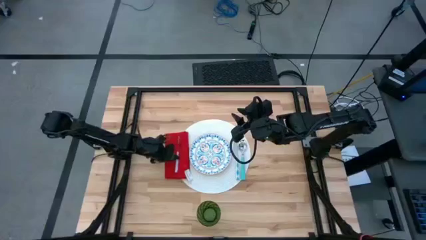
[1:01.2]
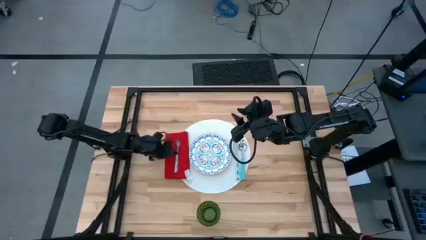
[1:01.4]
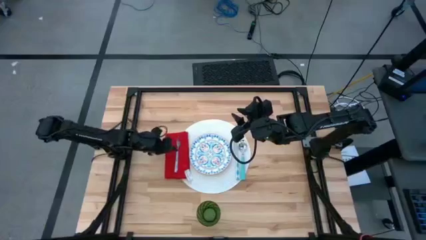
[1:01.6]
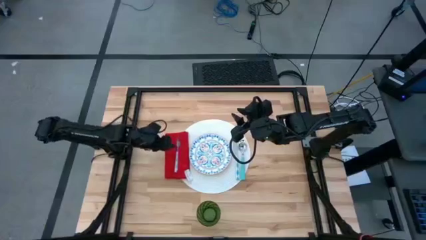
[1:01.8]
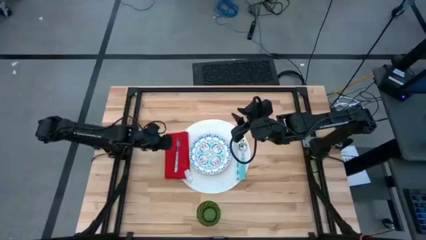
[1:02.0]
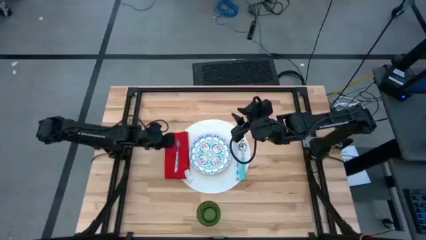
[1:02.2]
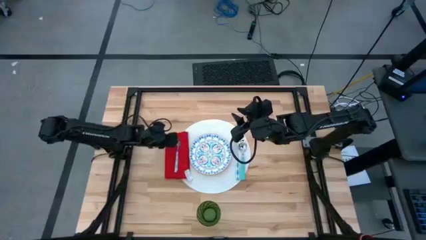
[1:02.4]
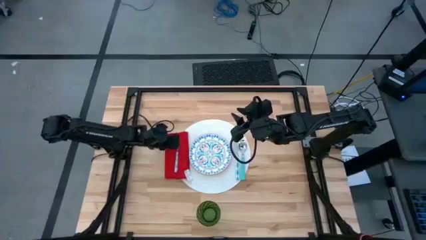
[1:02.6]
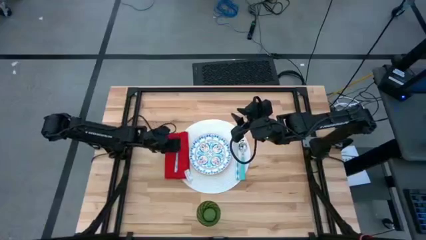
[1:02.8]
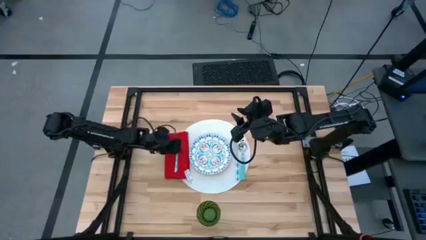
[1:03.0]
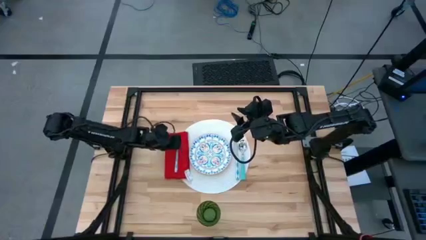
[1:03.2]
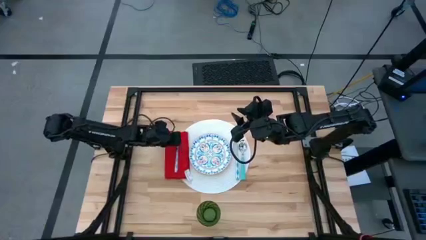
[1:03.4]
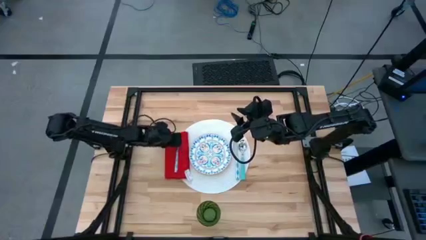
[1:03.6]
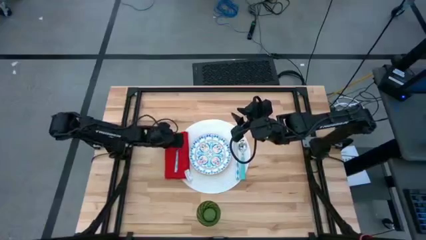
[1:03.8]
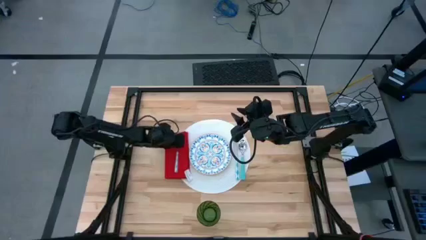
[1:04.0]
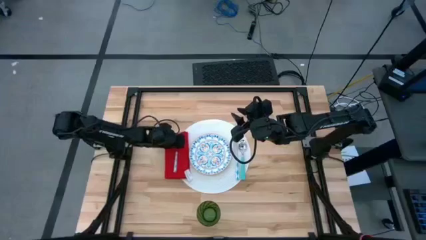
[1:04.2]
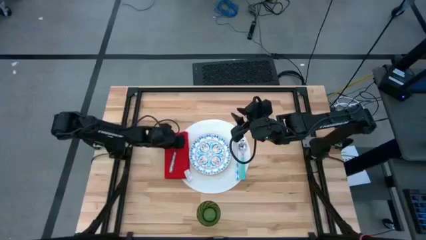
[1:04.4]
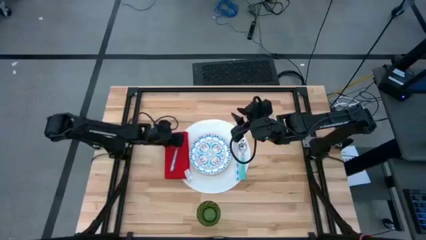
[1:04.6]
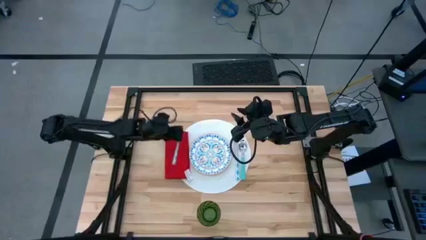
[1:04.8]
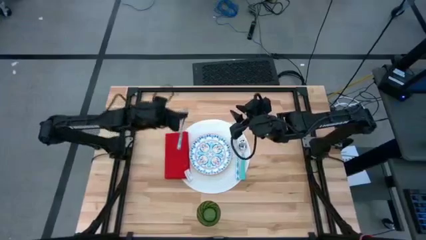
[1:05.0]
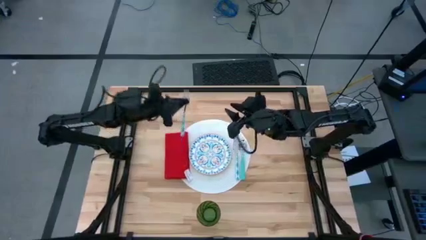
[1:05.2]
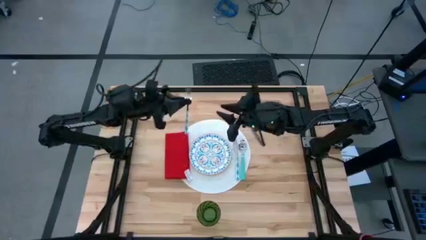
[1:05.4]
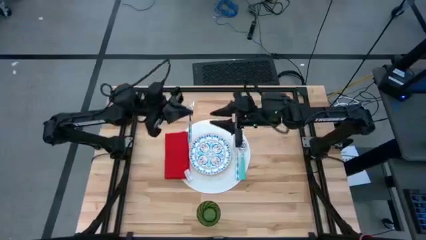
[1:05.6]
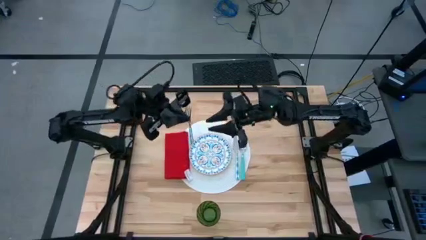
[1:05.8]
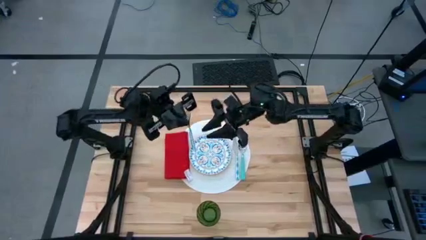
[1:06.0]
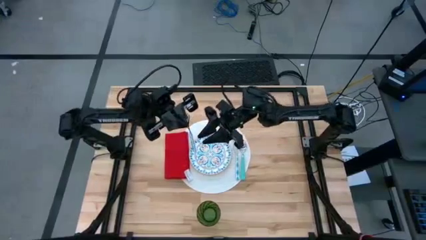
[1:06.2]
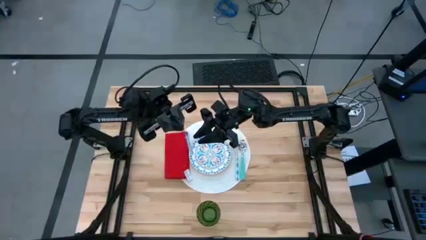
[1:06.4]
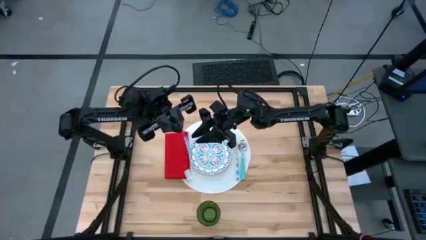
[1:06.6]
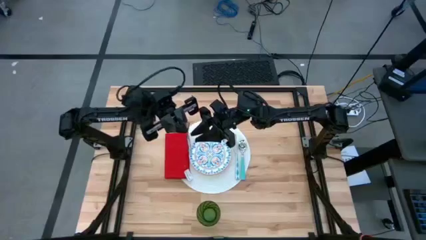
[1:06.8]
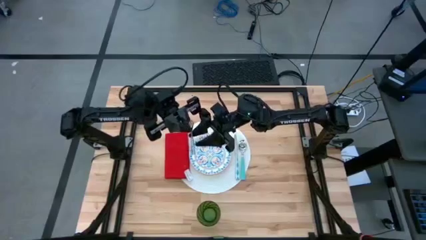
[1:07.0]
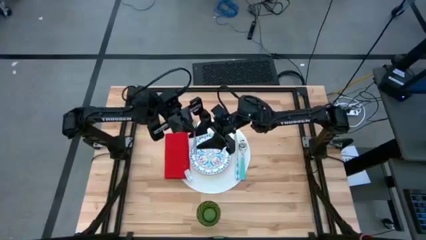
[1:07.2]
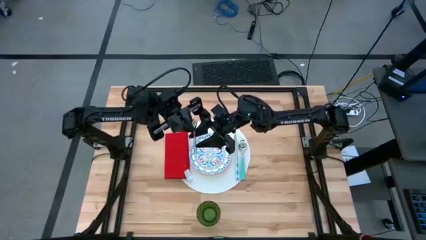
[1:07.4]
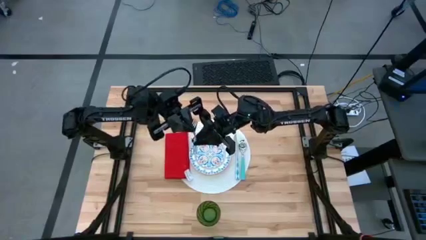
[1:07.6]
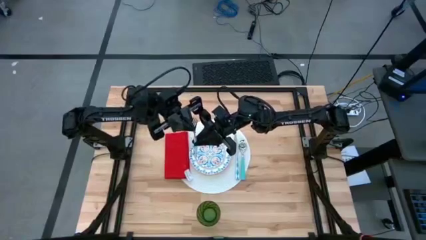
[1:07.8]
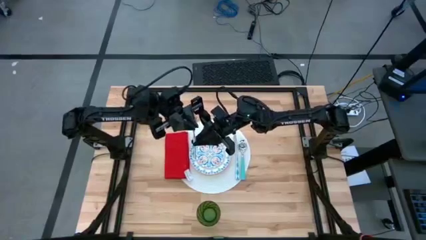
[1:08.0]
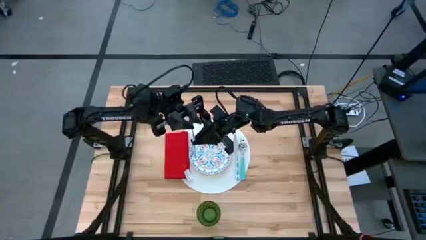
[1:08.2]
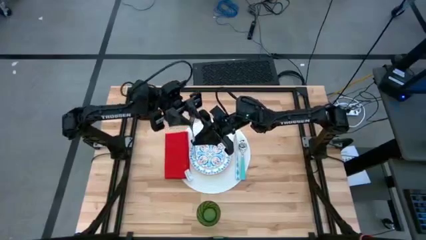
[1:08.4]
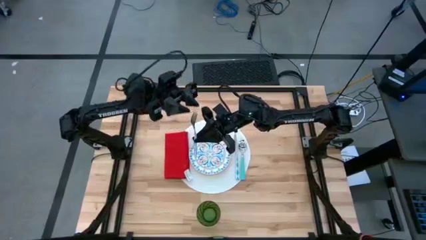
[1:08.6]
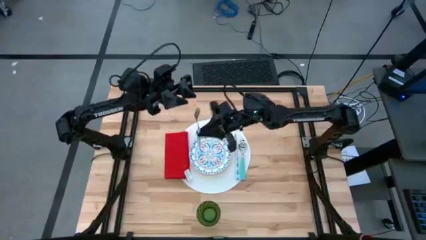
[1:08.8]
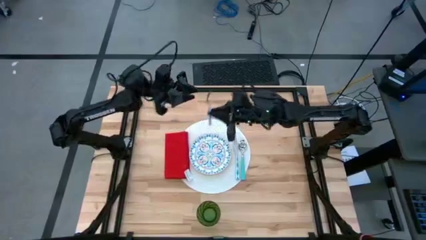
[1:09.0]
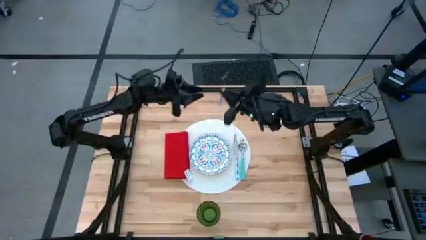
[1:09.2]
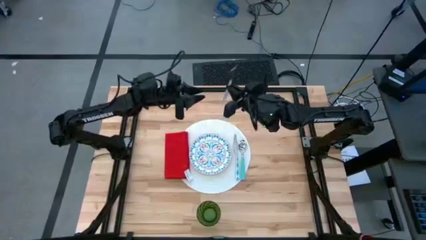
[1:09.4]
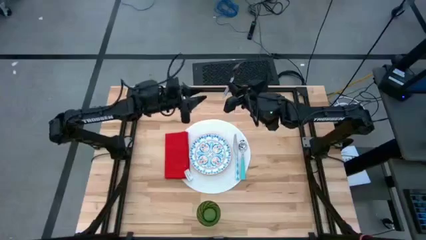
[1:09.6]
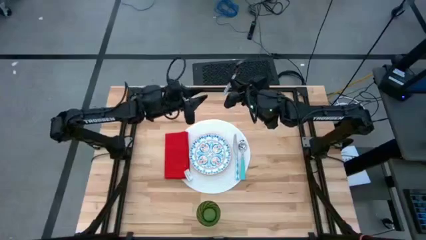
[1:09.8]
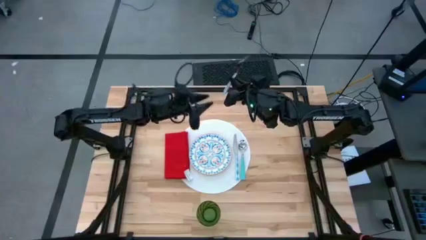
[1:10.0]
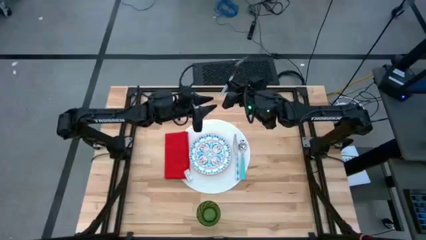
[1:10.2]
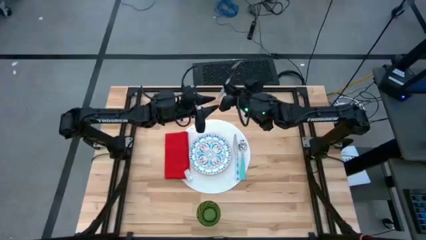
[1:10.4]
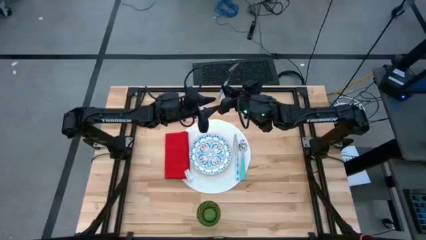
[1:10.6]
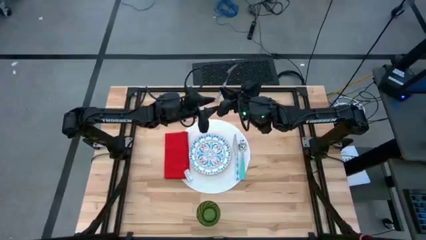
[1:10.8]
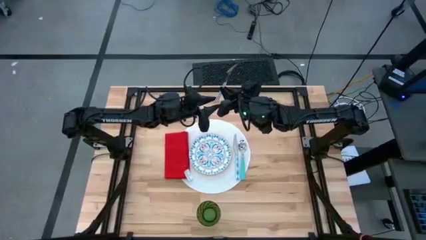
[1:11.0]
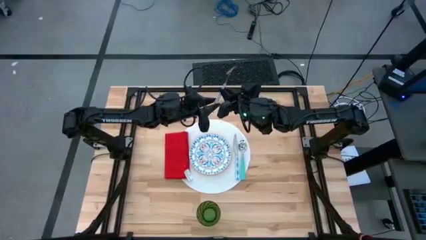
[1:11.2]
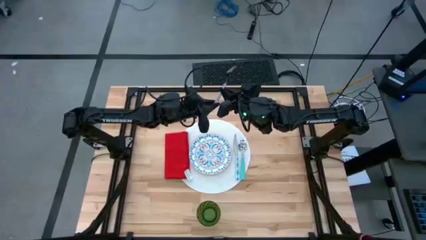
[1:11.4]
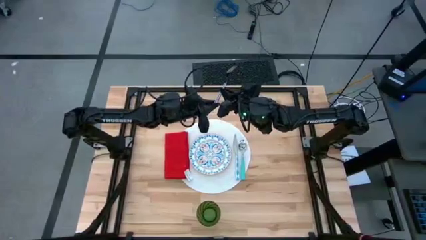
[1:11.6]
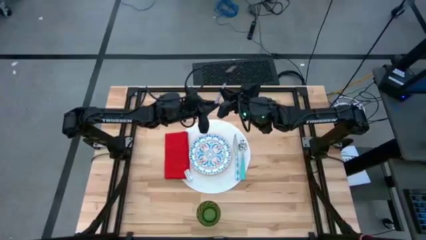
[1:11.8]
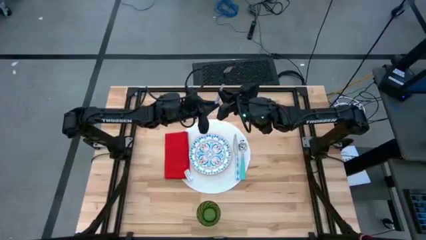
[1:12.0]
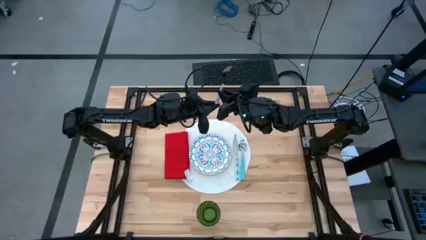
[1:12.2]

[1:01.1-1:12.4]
Task: Set table place
Adjust the fork on the red table napkin on the white tablemat
